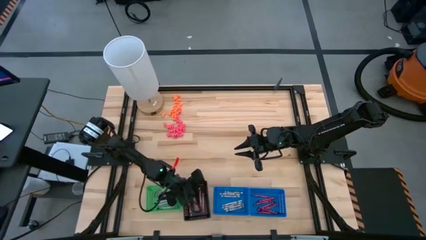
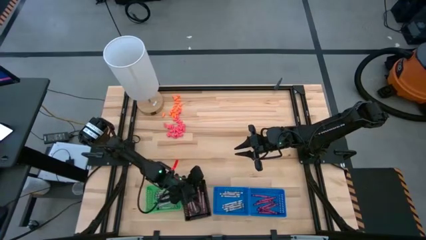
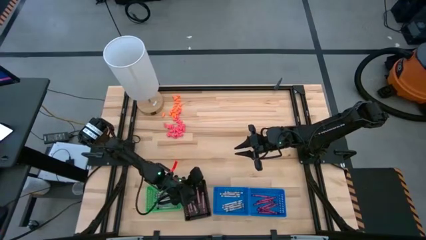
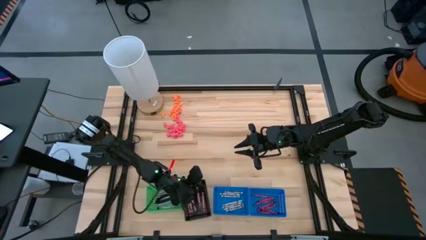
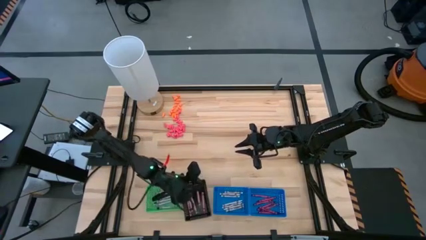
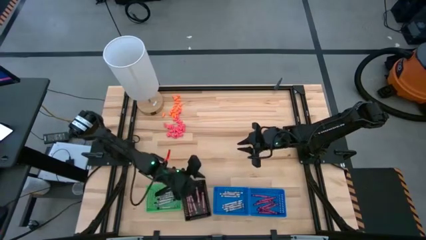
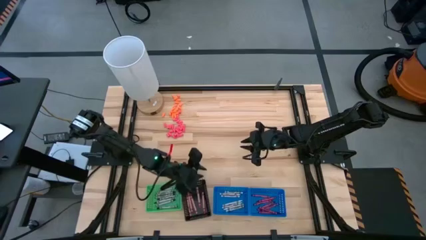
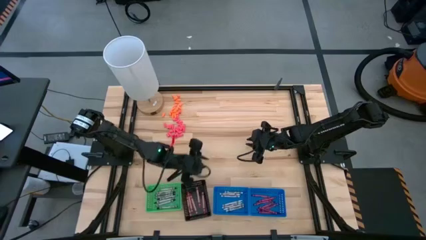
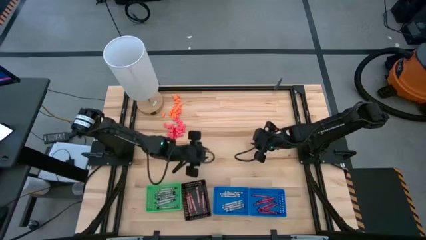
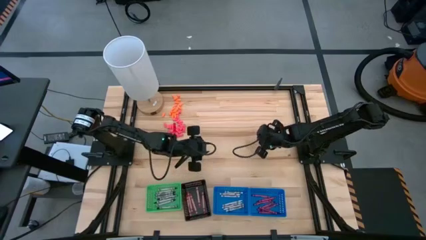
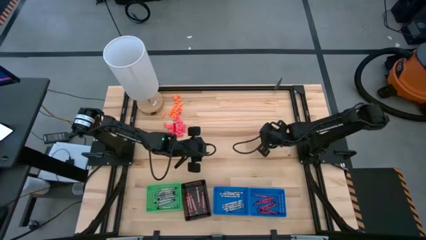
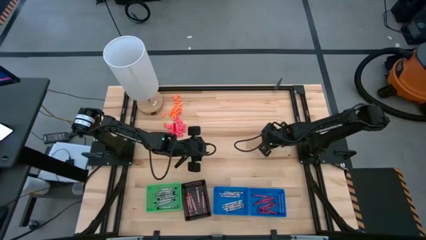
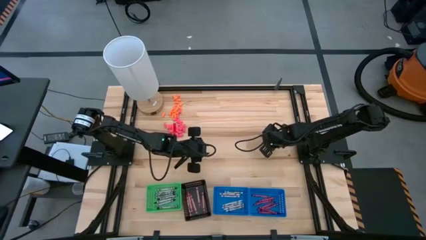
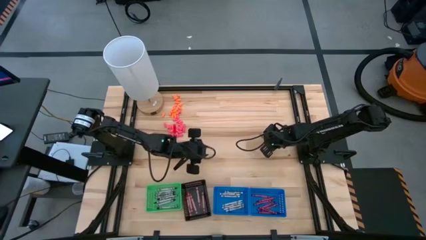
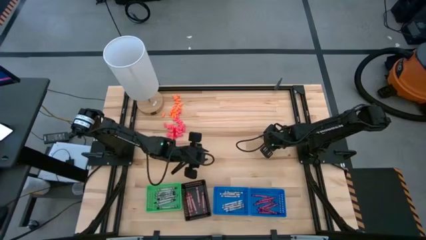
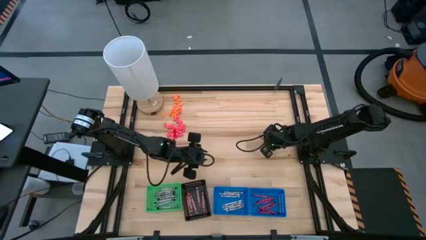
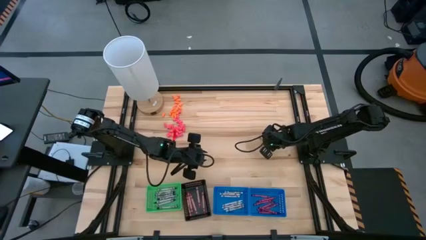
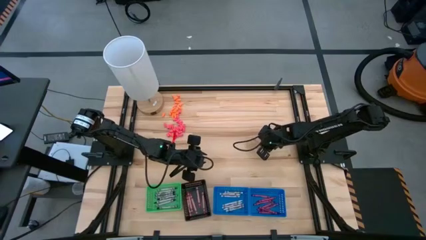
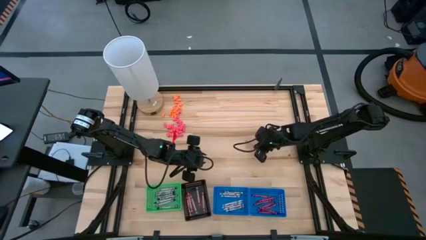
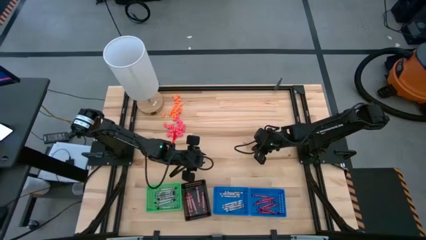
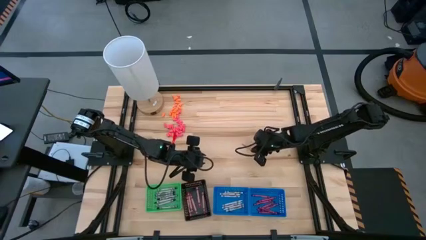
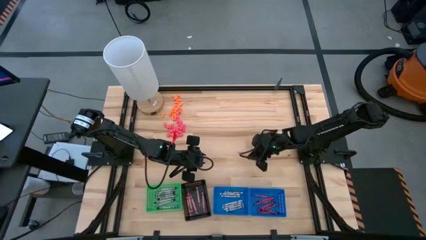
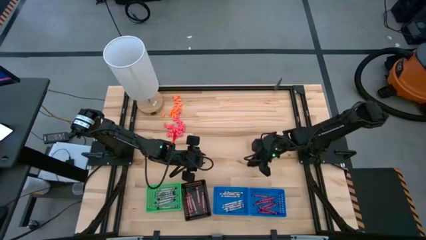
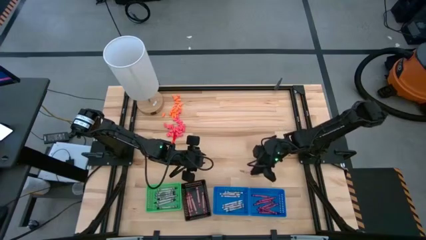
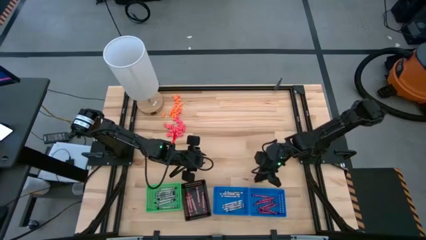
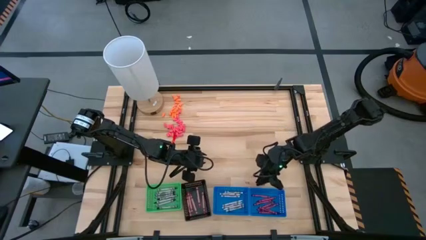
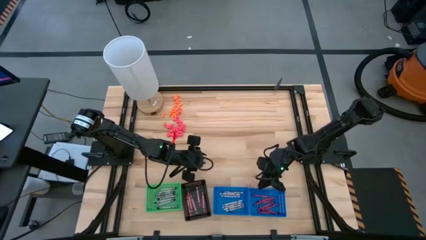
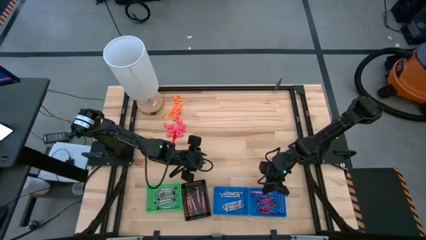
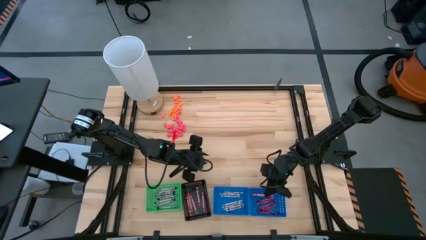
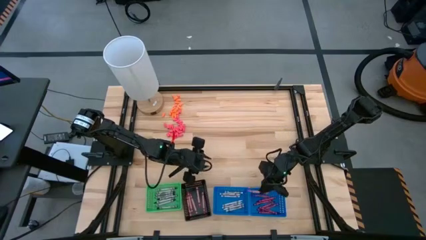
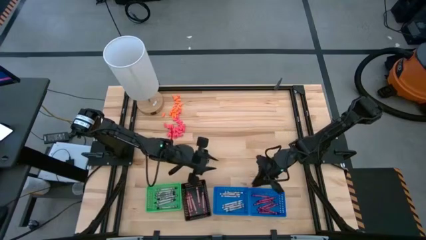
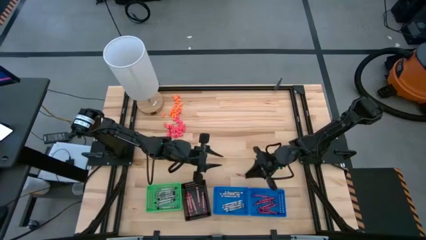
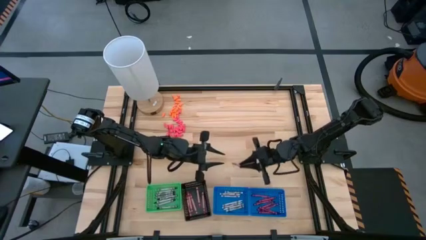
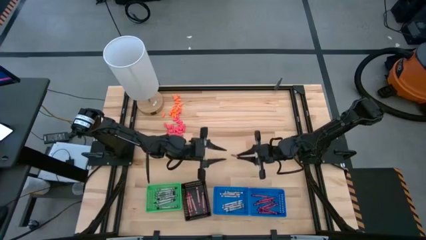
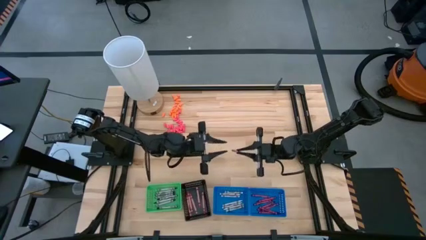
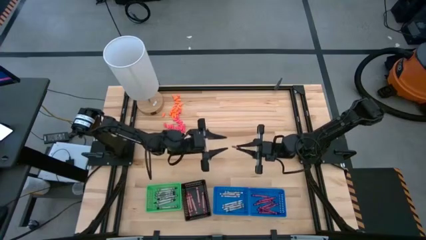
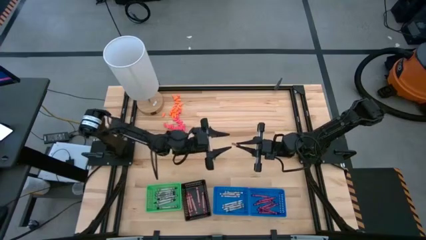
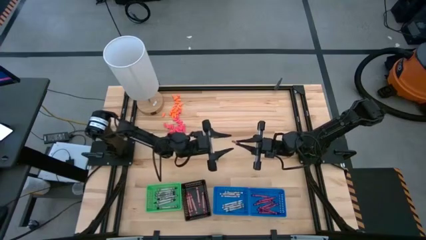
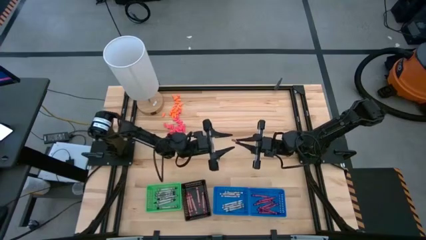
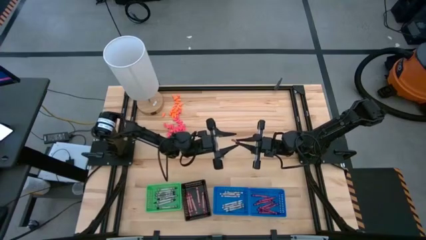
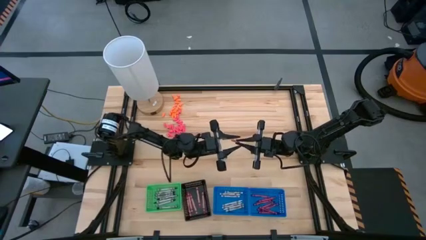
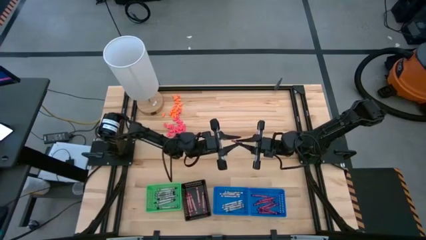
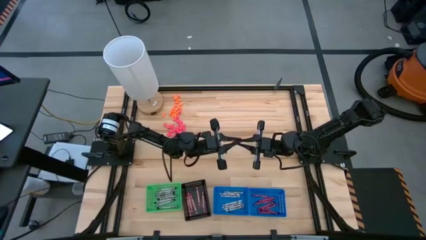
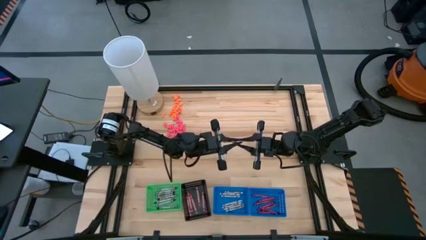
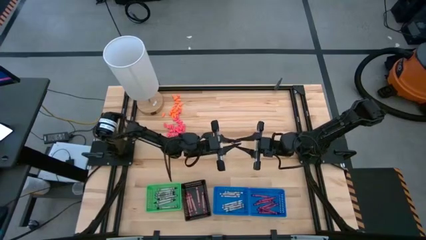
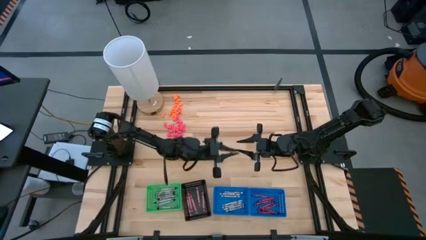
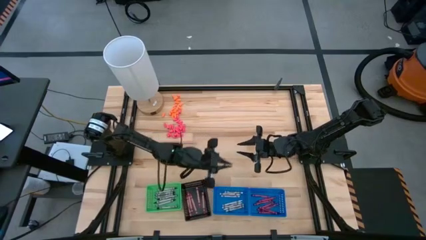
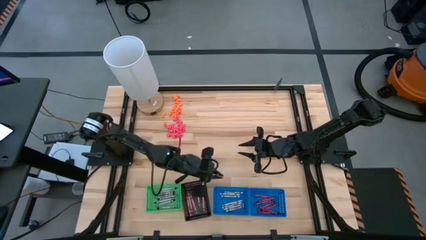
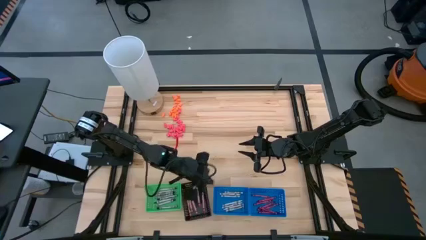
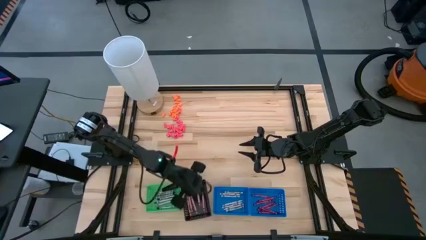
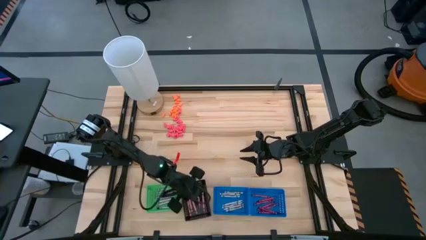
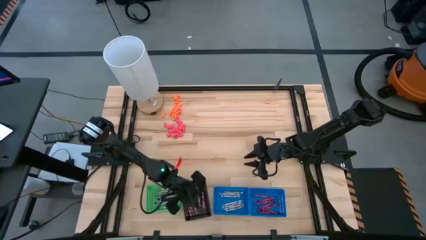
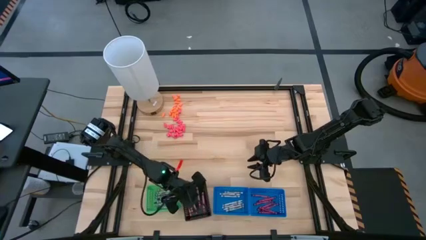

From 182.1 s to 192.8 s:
Task: Sort crayons
Put the pink crayon into the black bin

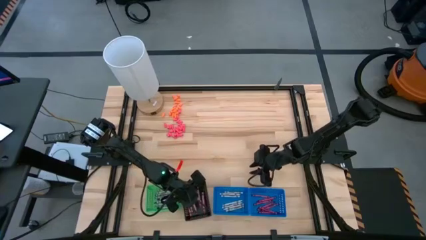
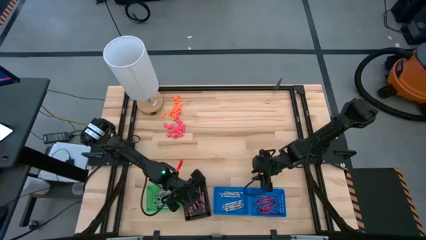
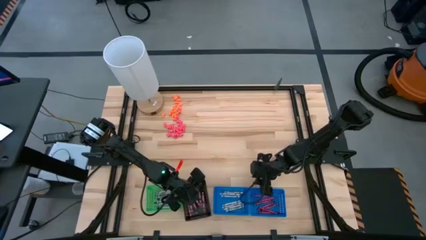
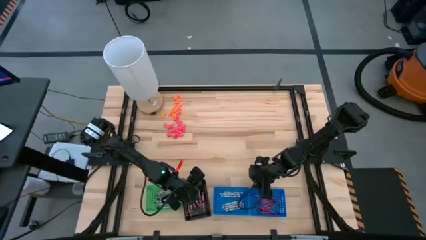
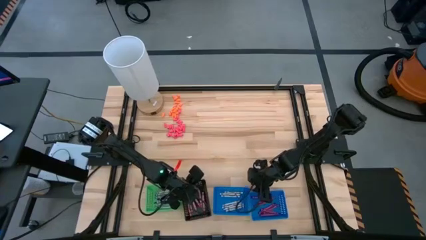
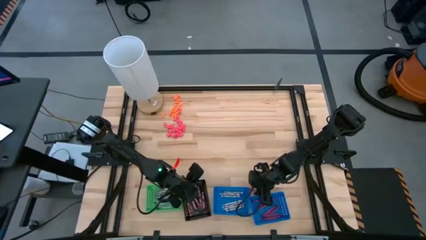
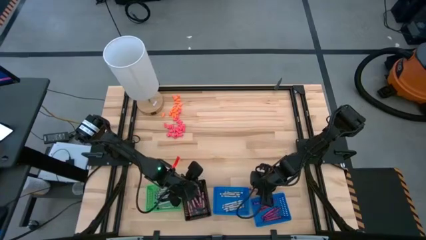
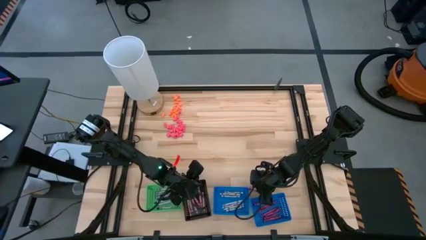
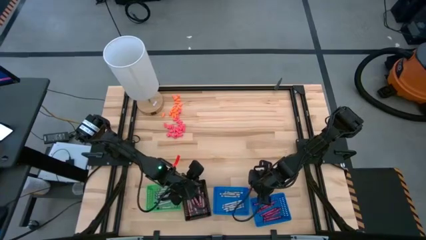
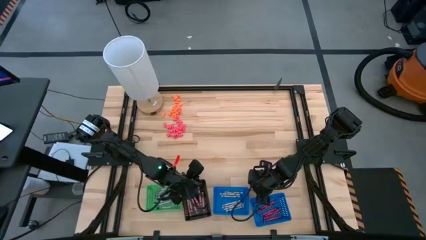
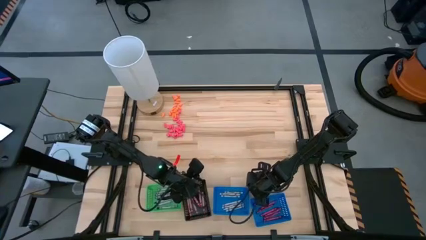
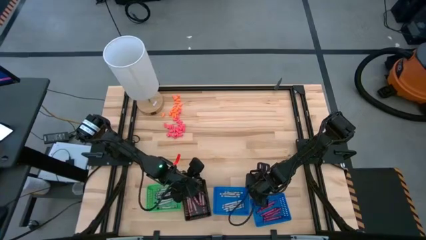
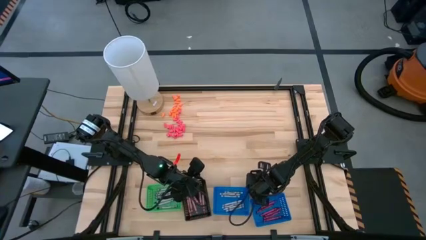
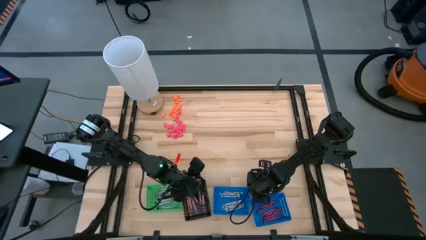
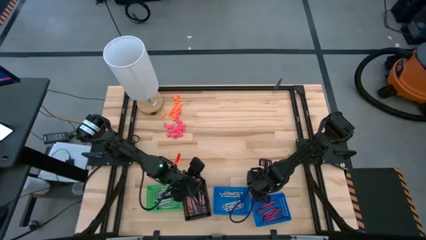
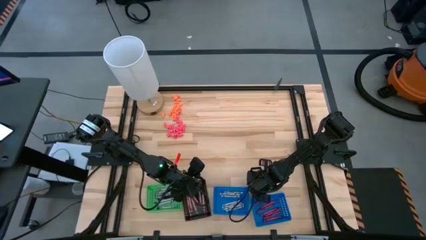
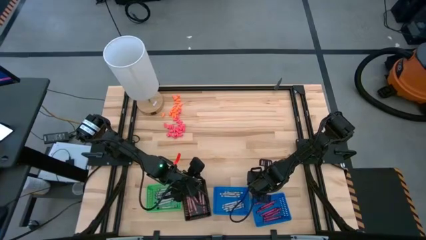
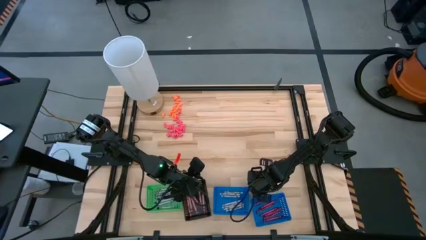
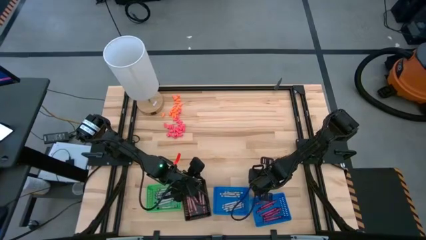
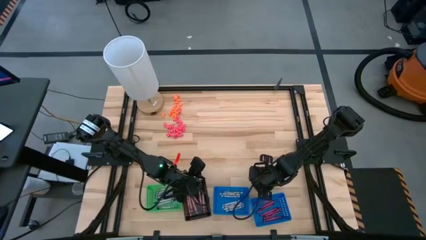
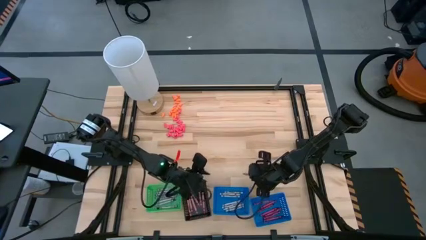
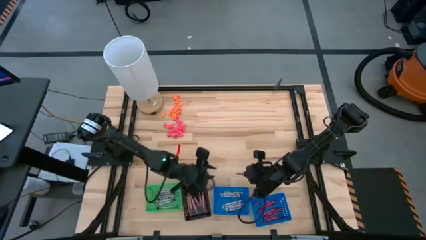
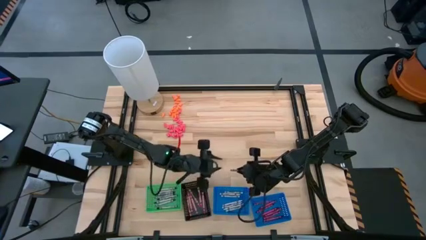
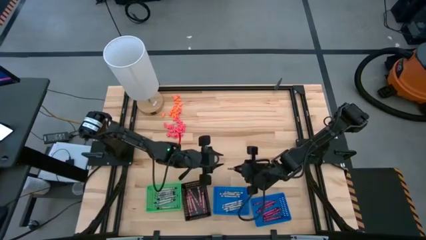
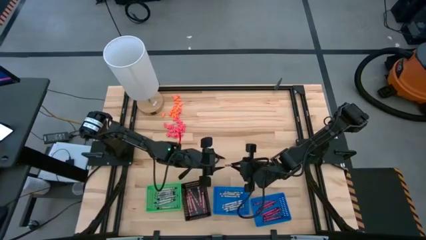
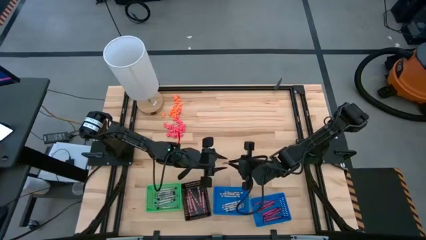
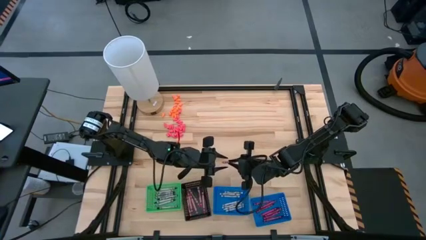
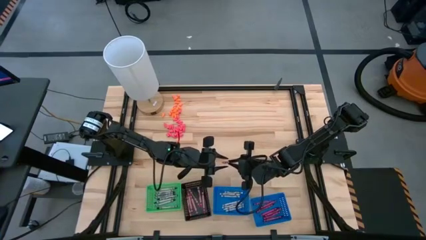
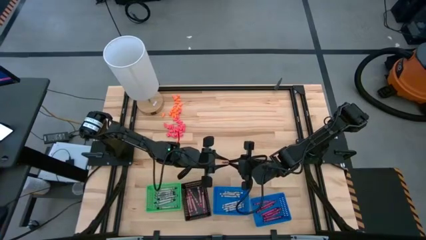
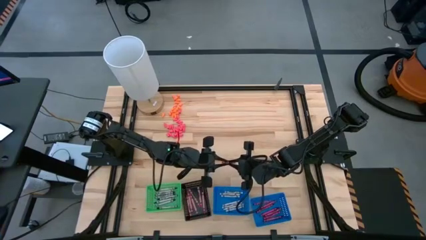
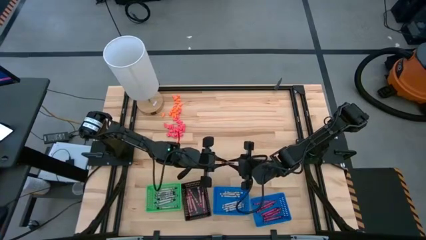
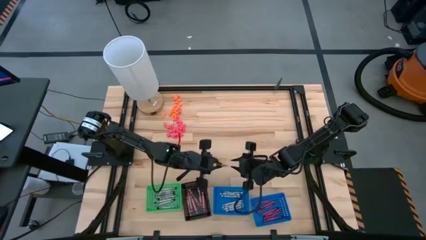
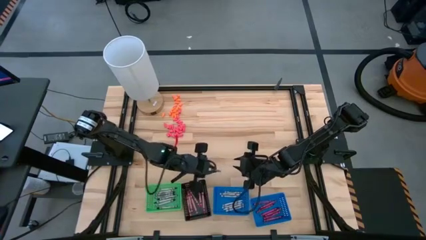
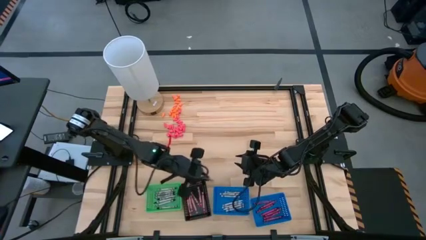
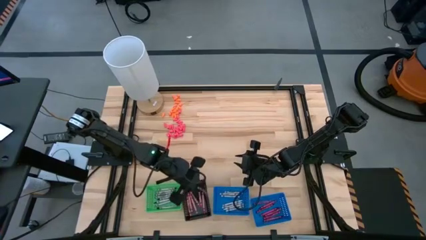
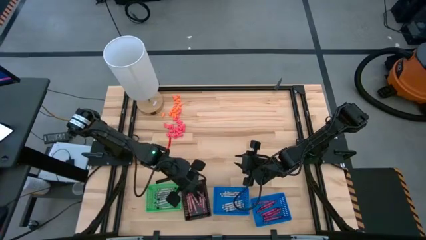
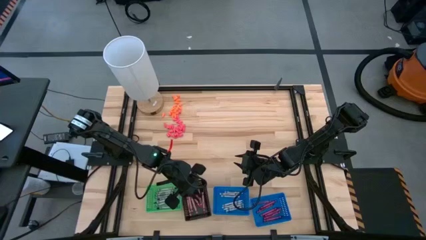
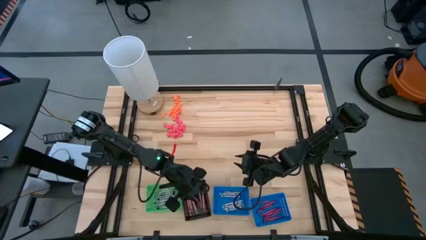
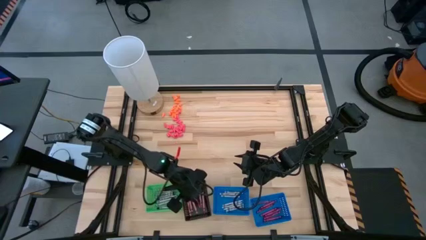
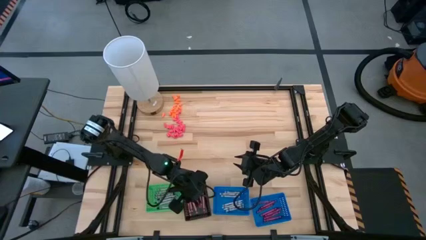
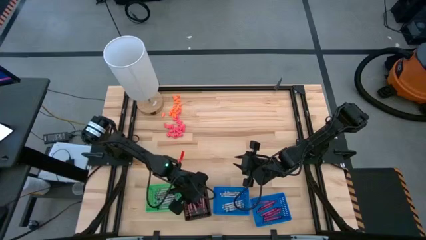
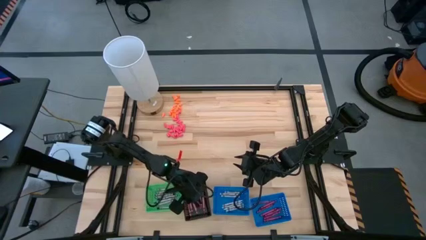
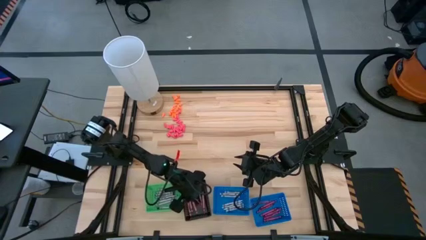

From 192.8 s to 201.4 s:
Put the pink crayon into the black bin
